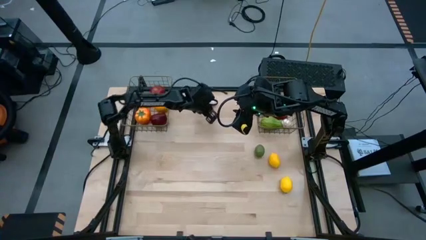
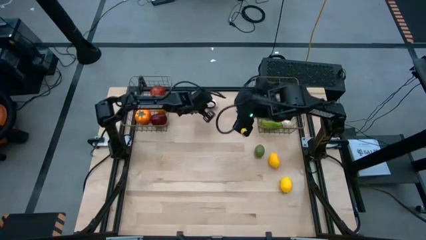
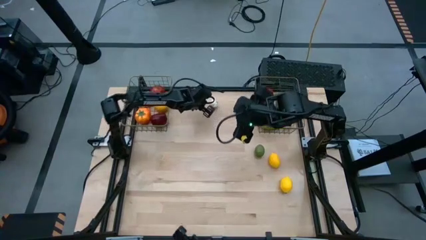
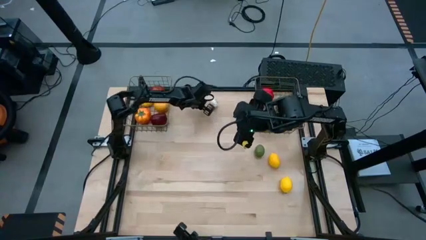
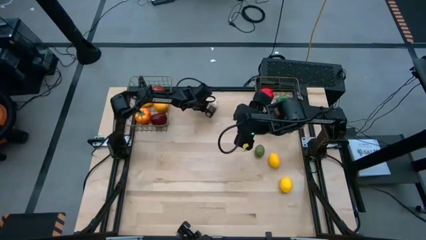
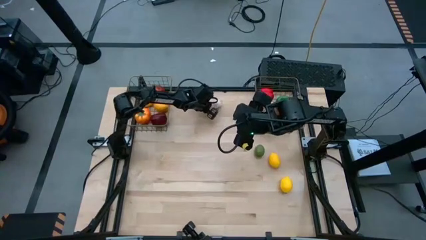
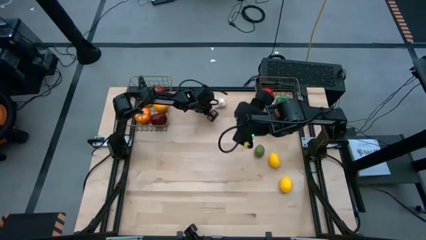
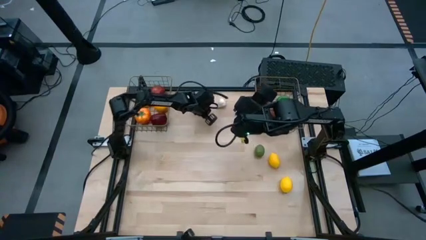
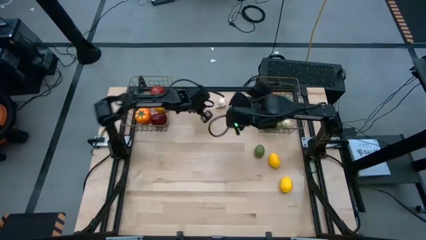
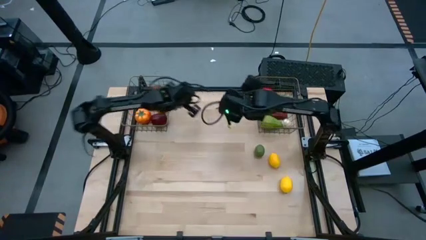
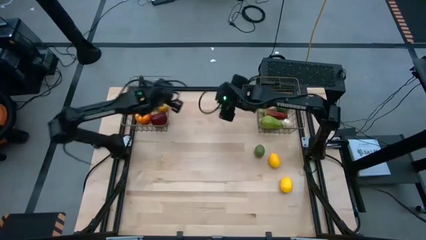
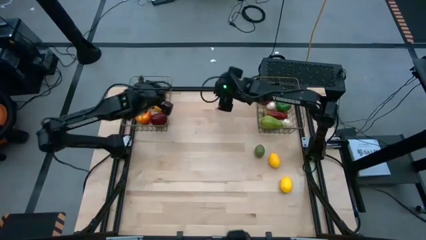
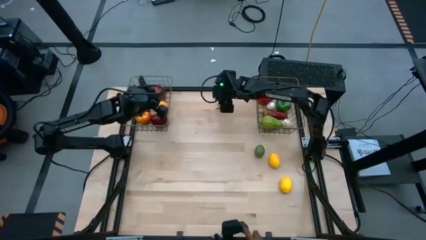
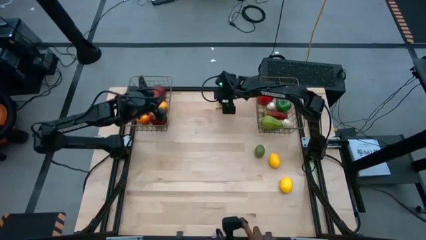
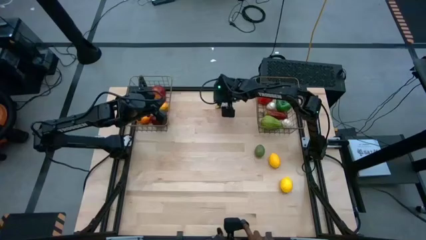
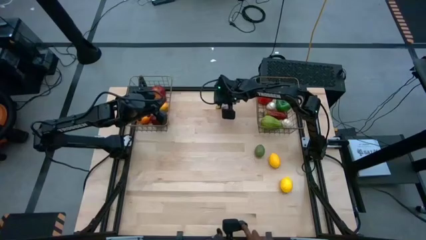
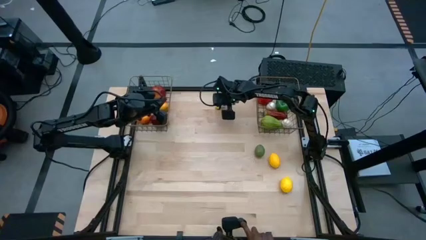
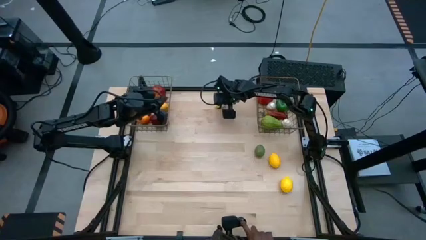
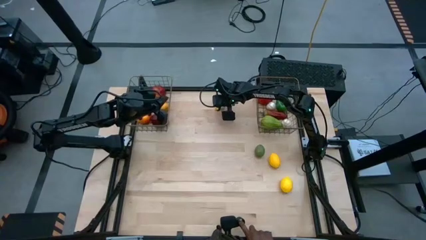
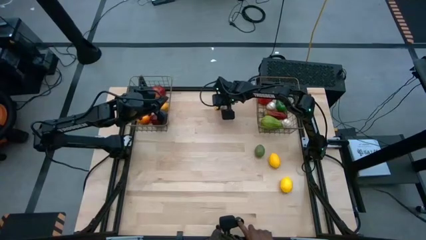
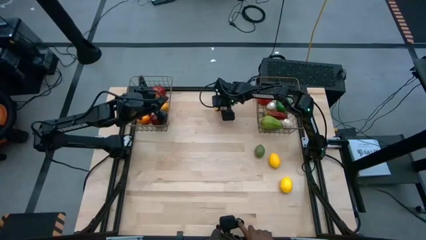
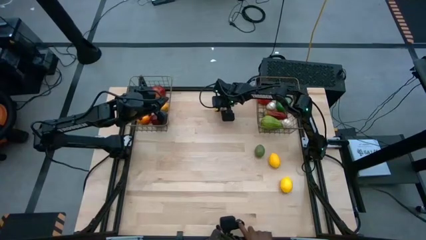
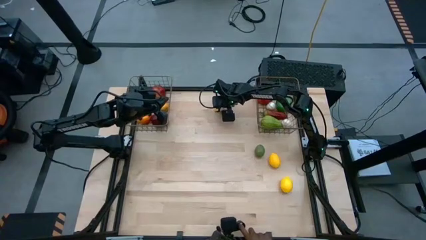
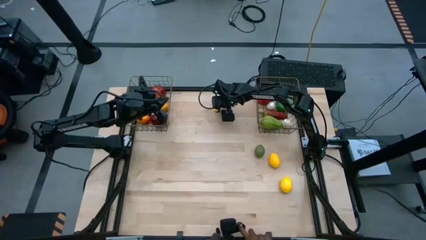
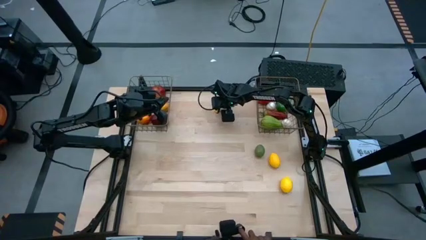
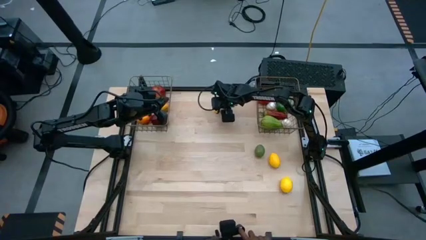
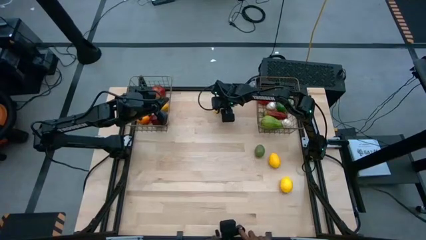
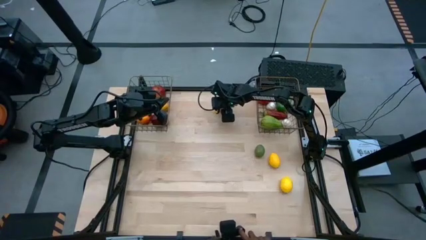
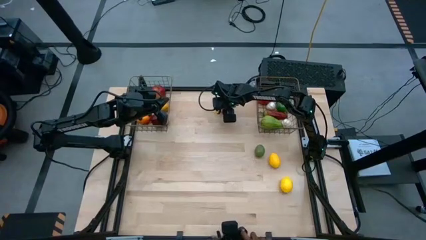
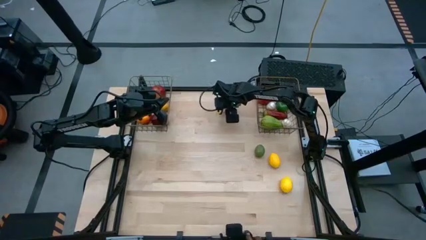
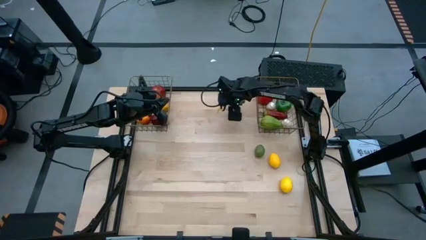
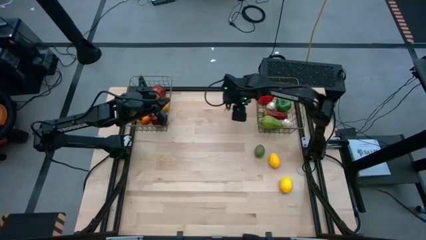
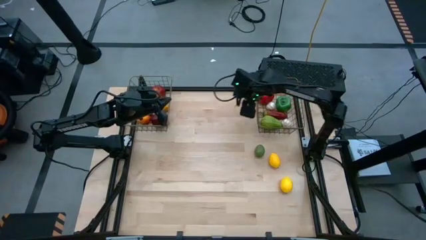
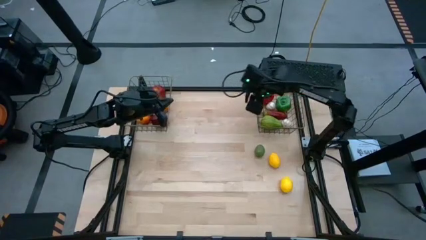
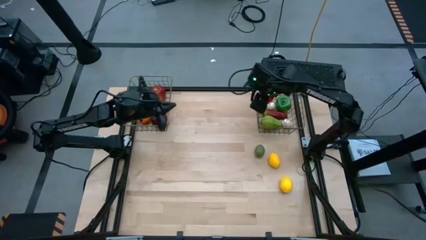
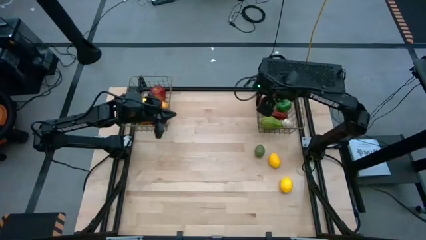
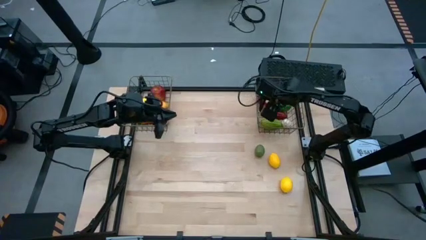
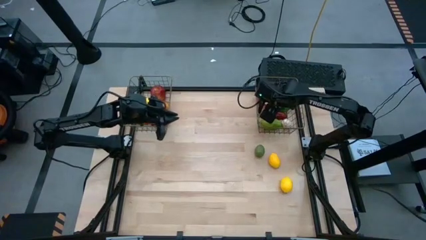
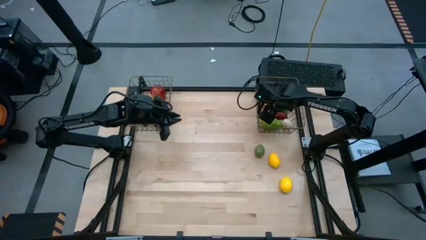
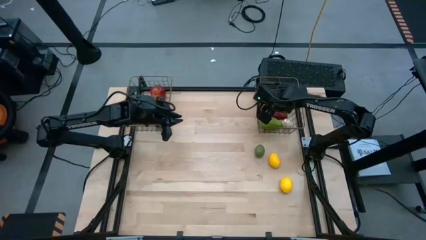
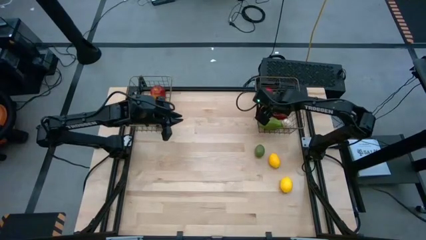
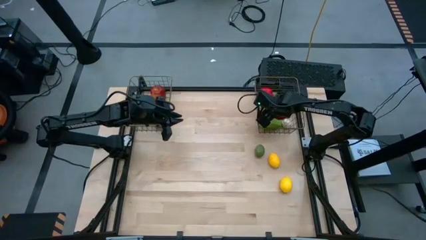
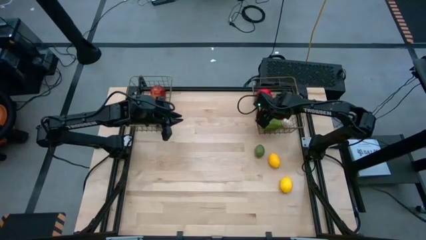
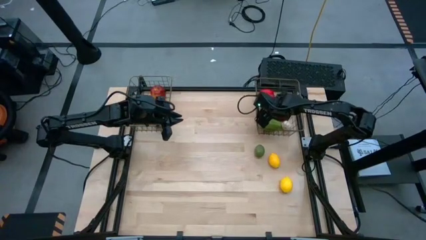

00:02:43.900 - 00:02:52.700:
Task: Sort produce into baskets
Put the garlic into the right wire basket

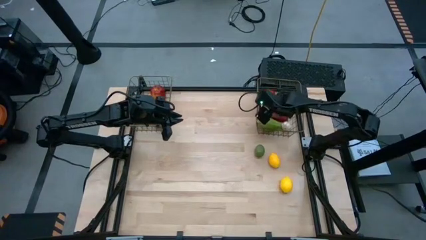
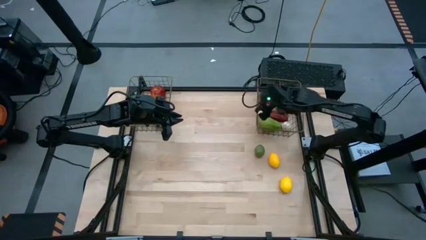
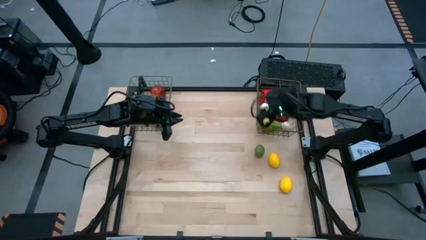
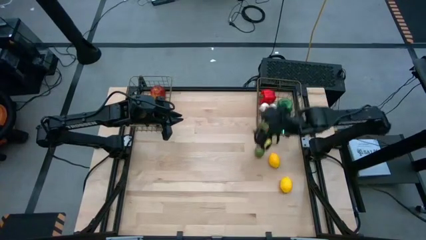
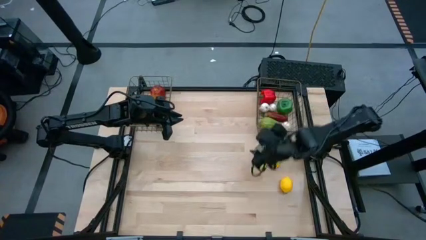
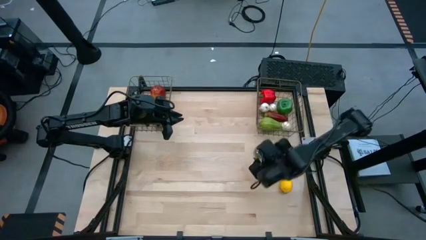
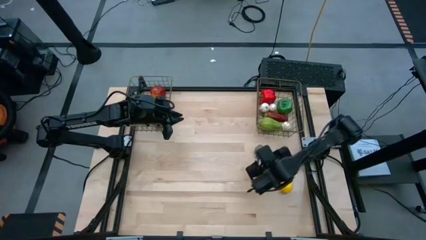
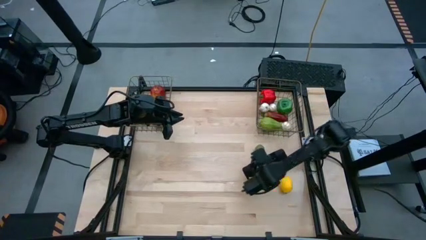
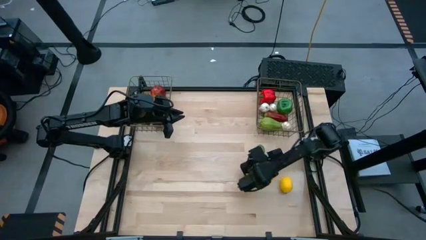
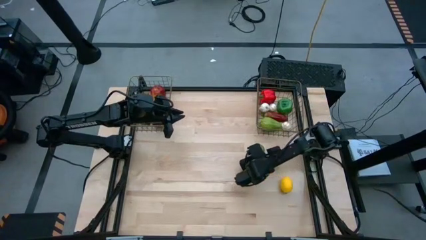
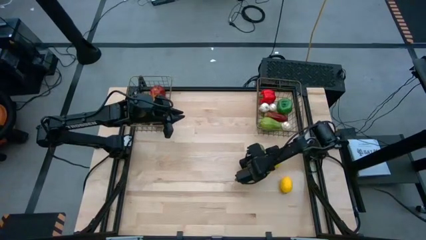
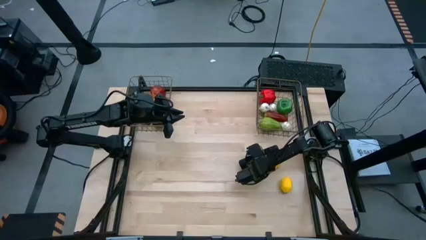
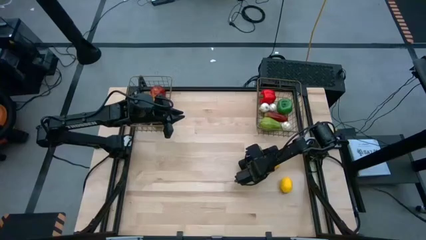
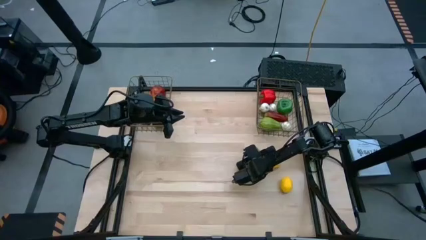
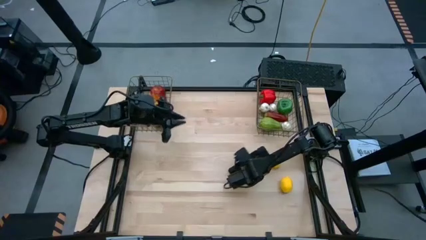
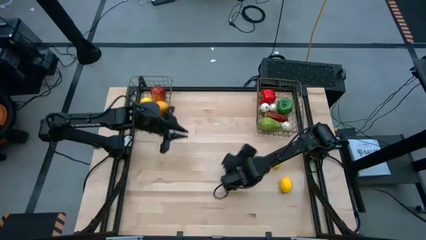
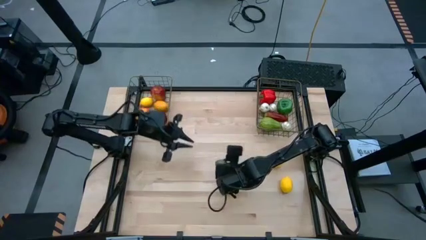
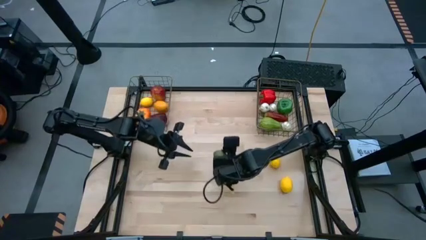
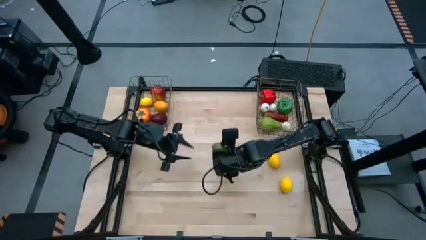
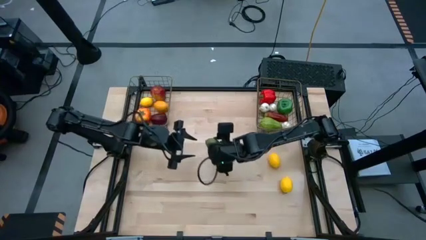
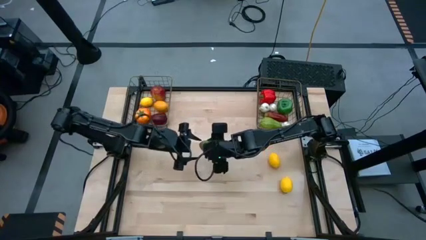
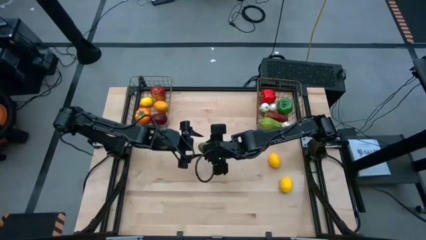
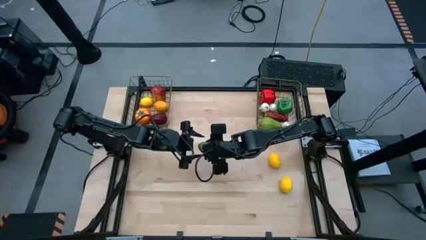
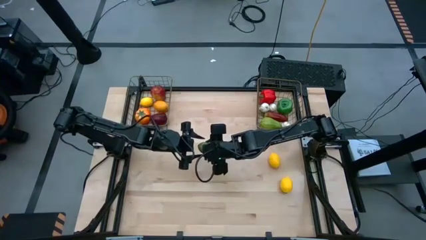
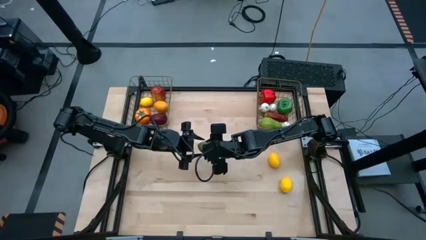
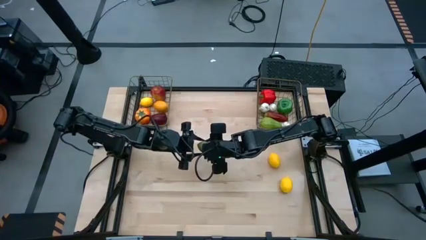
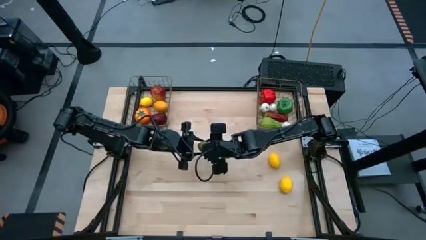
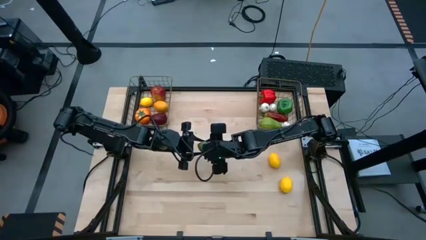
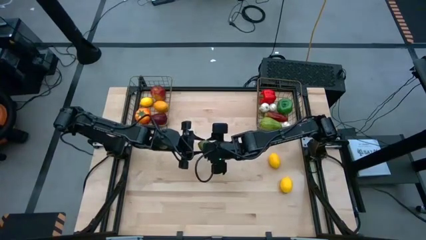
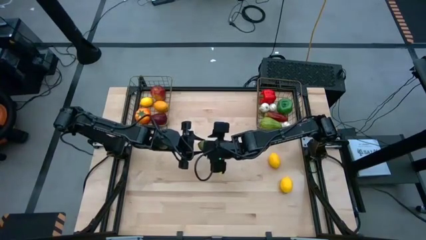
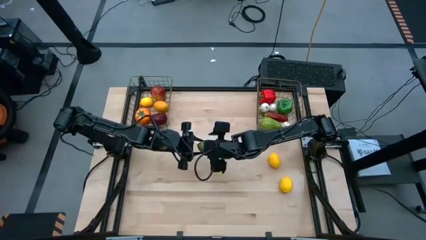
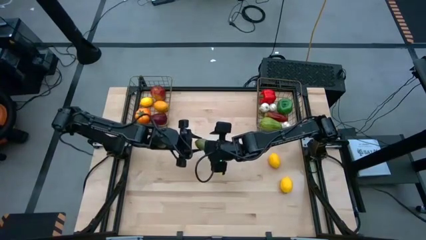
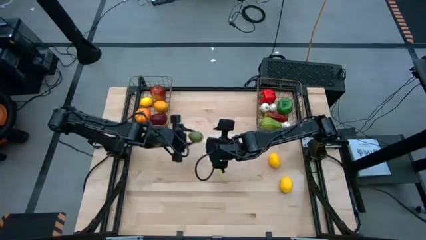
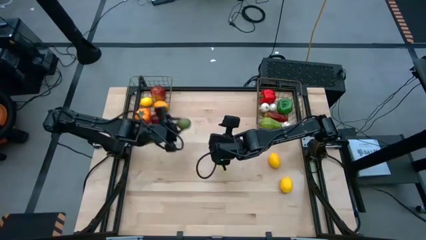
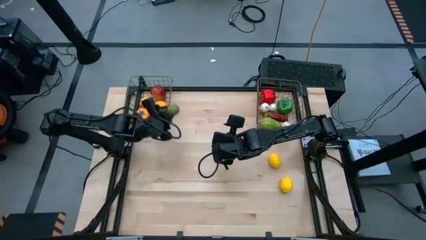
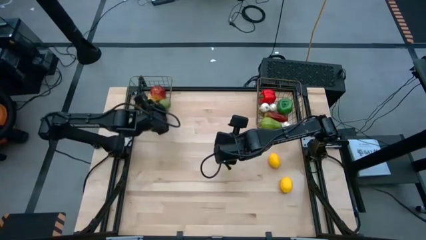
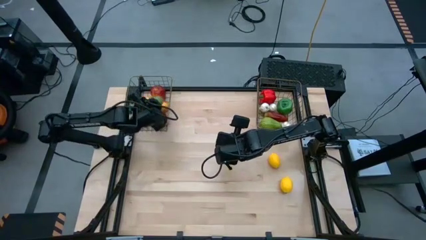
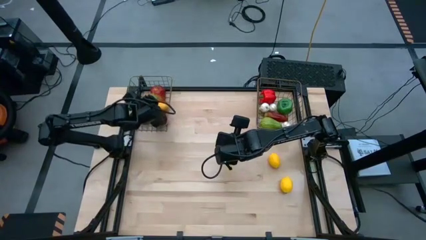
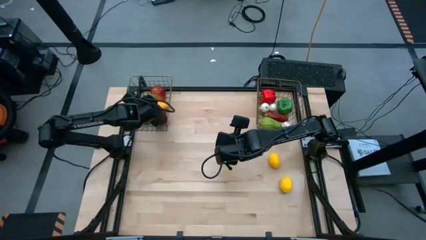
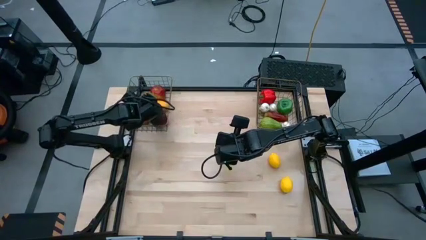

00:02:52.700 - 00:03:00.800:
Put the lime into the left wire basket
